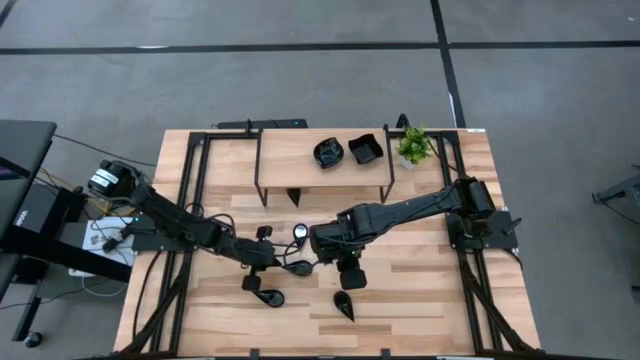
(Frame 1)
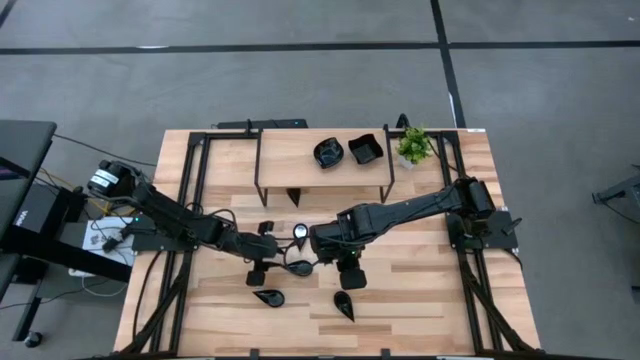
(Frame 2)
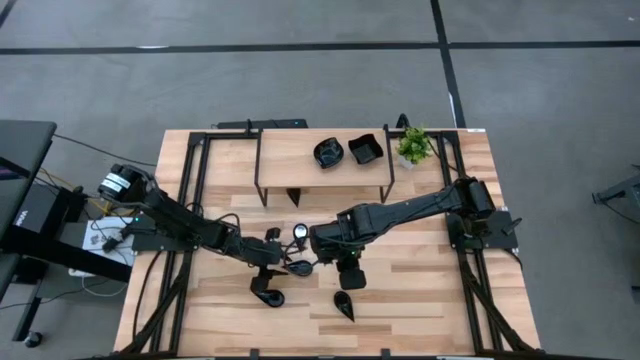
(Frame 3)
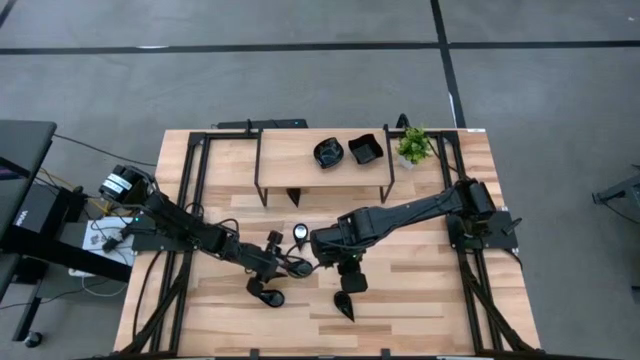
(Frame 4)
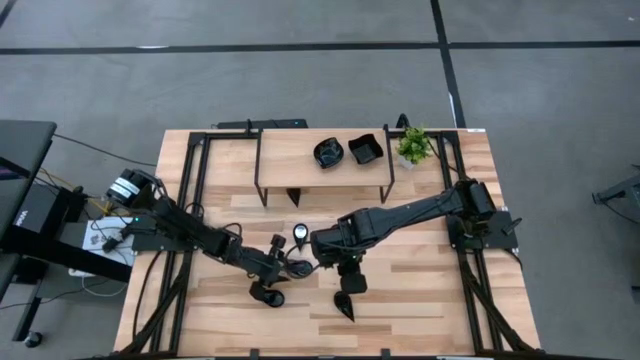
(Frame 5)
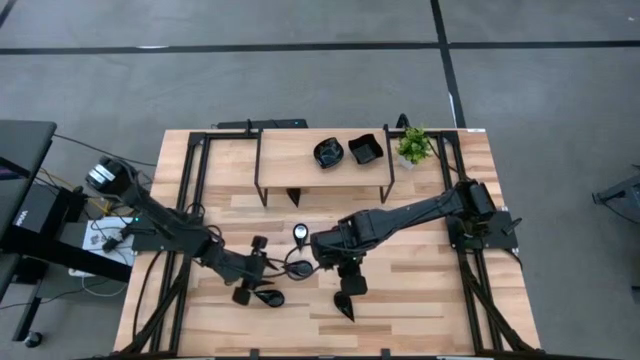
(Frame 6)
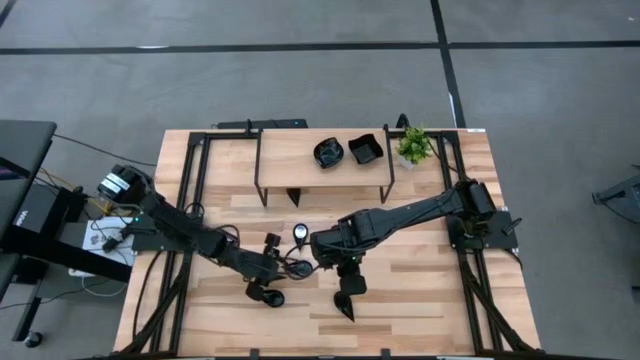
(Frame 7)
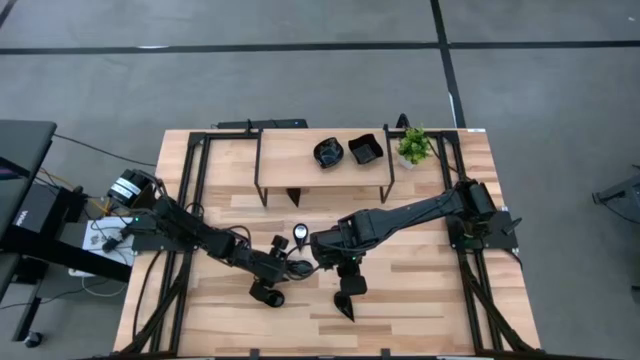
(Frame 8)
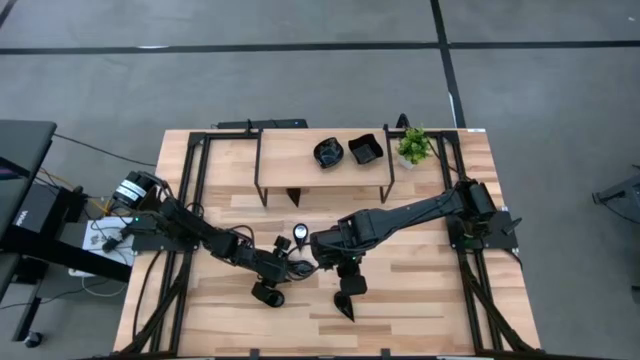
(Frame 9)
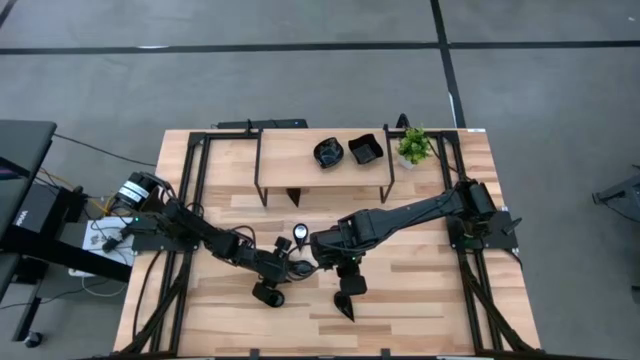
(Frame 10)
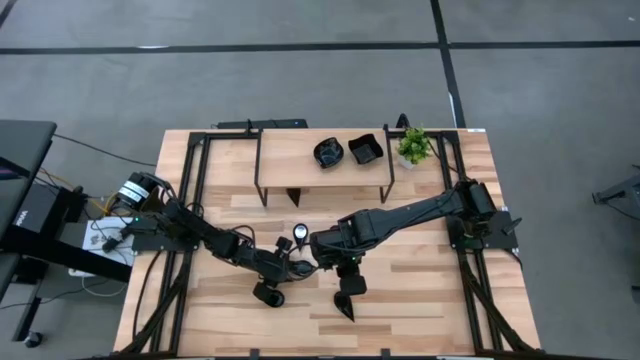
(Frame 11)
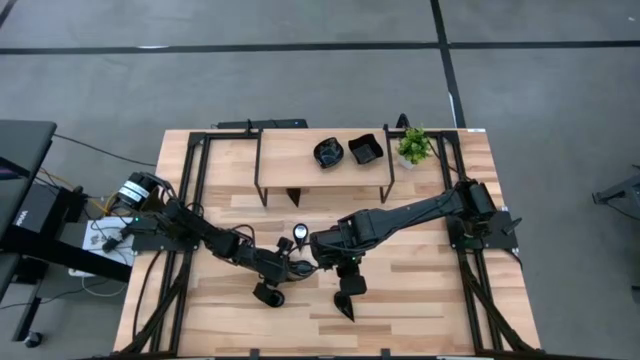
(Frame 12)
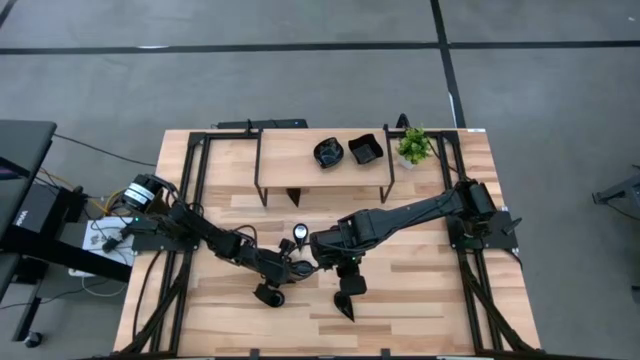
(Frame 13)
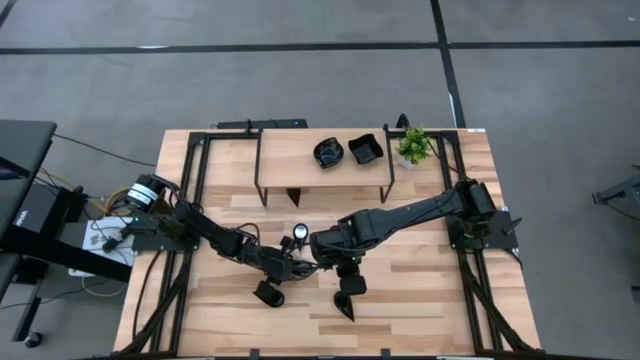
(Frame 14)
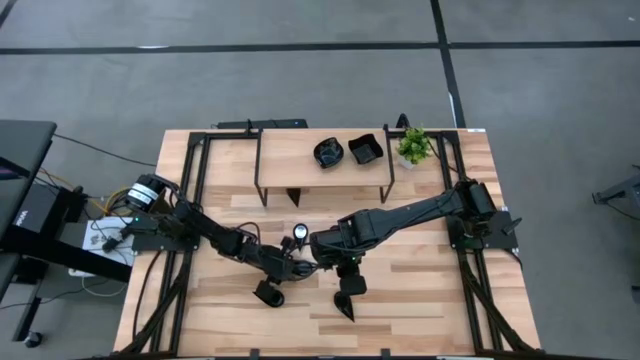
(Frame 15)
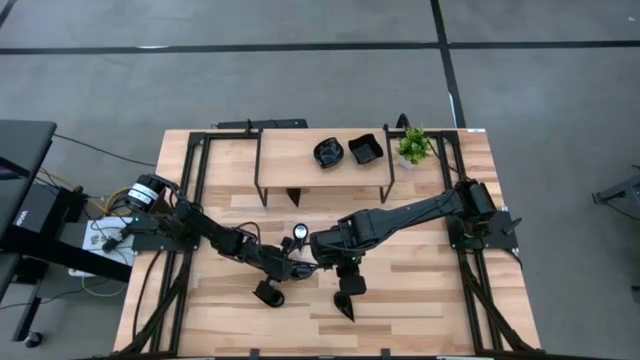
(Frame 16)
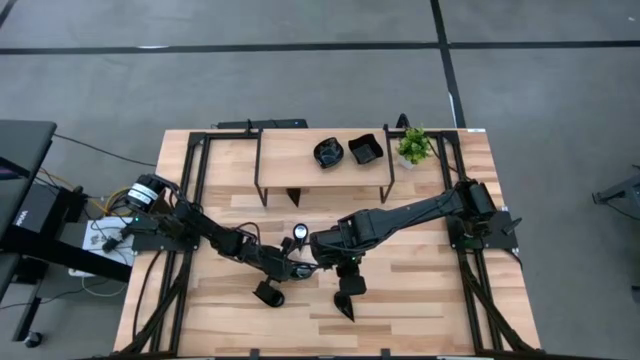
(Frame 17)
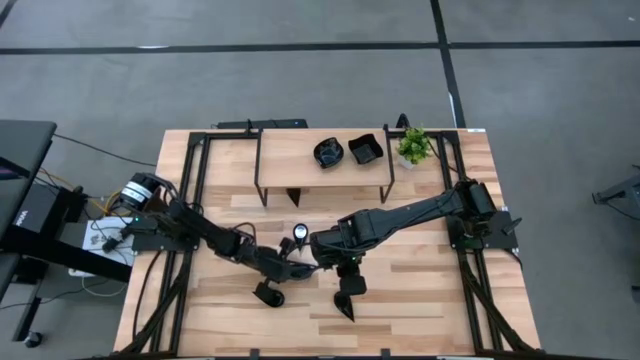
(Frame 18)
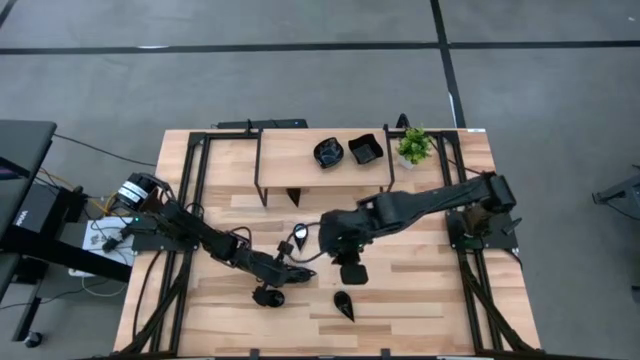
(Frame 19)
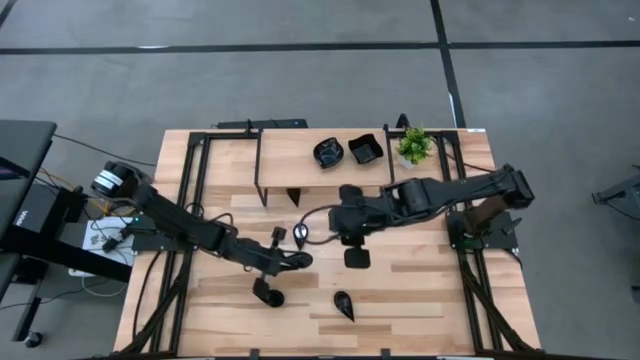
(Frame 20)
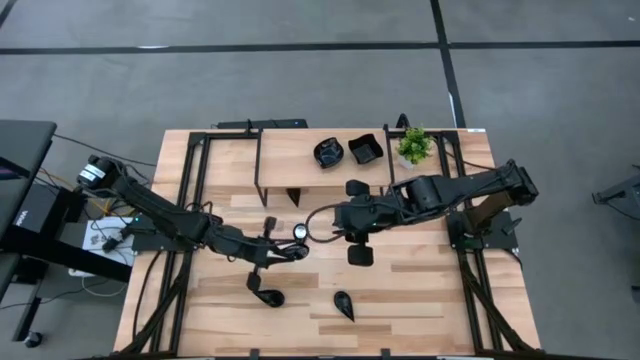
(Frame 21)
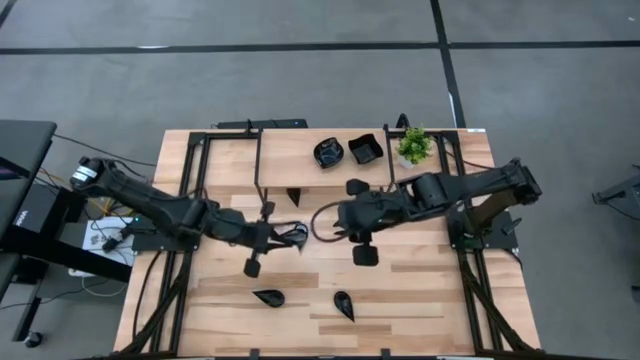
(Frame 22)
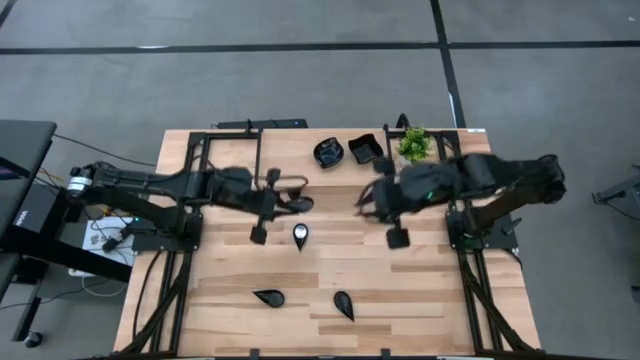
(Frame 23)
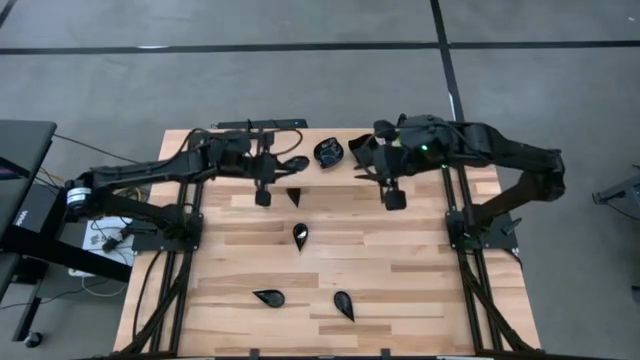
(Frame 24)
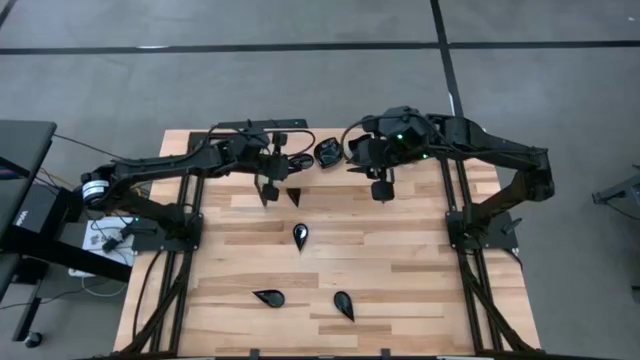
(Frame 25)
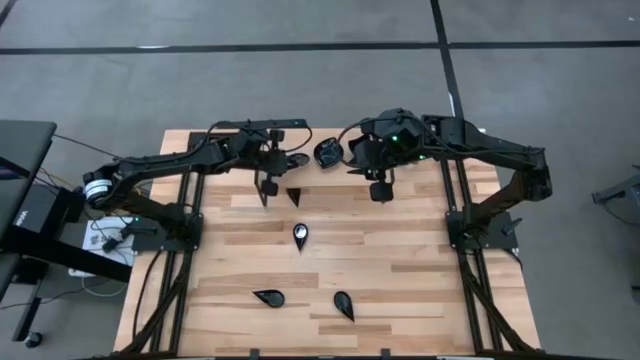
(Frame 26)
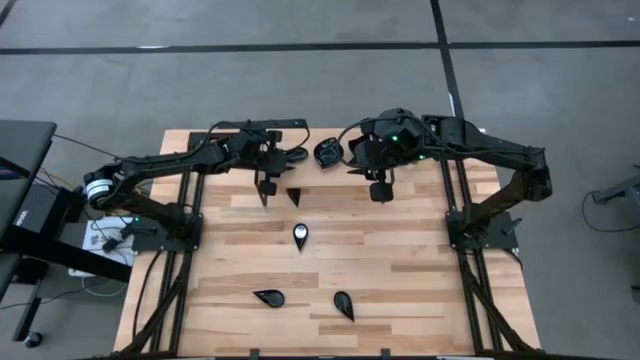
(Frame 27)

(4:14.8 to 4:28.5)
Task: Pick & Place Mini shaped plates
Put the black drop shaped plate on the shelf

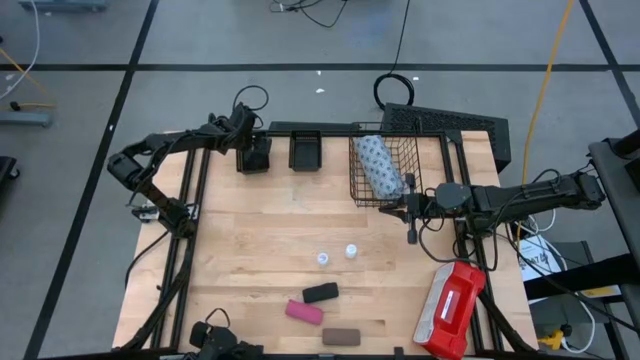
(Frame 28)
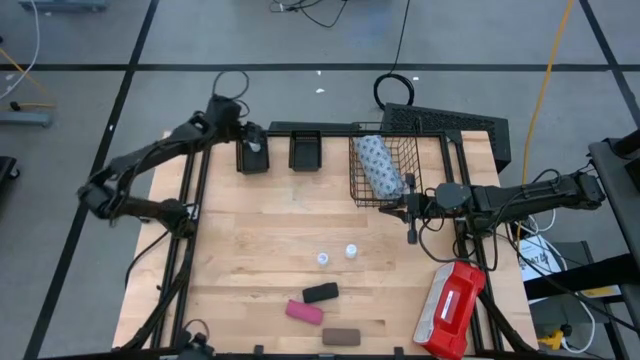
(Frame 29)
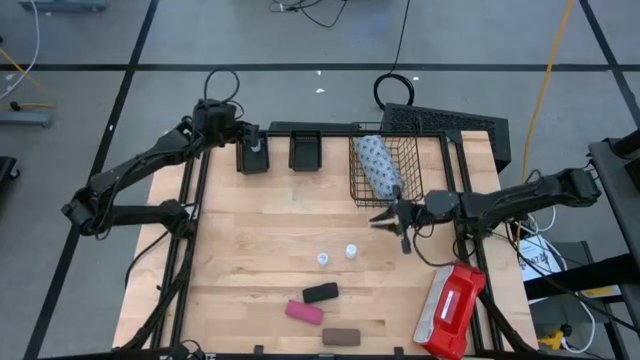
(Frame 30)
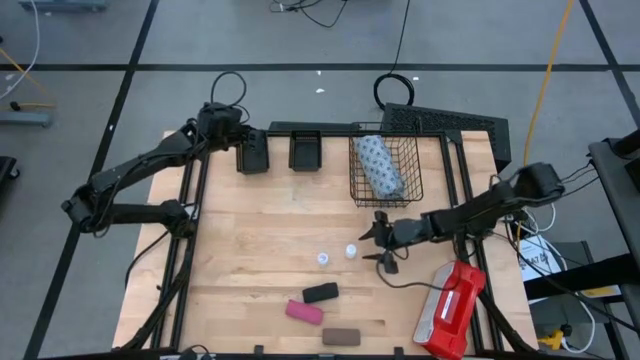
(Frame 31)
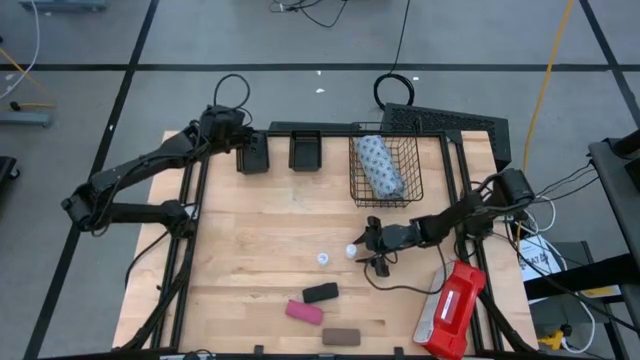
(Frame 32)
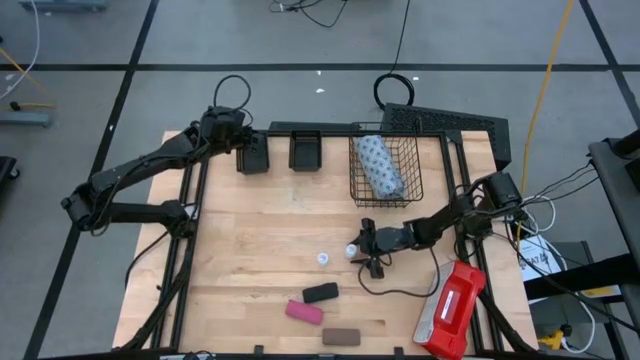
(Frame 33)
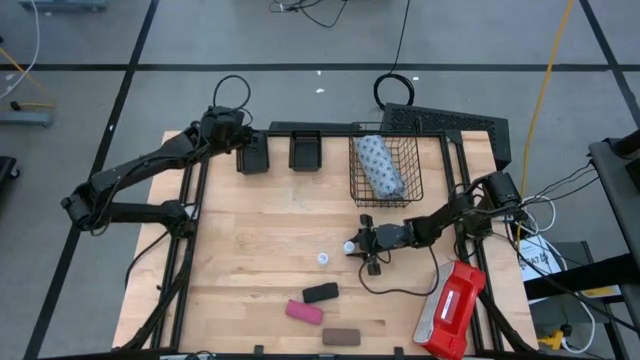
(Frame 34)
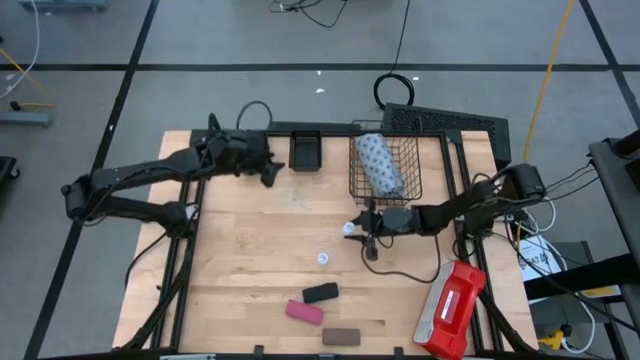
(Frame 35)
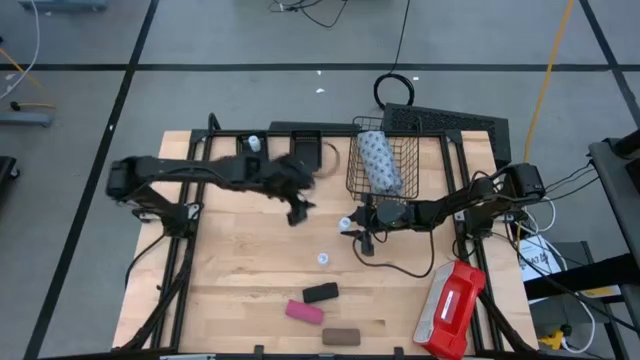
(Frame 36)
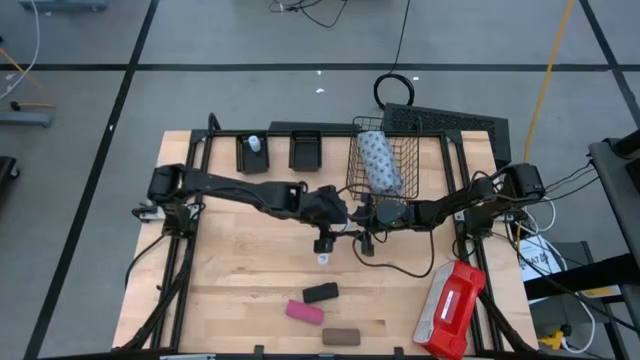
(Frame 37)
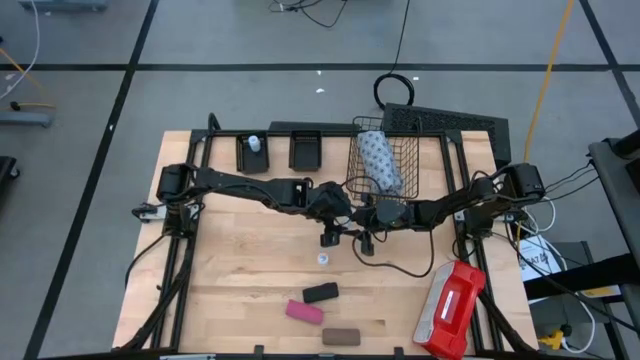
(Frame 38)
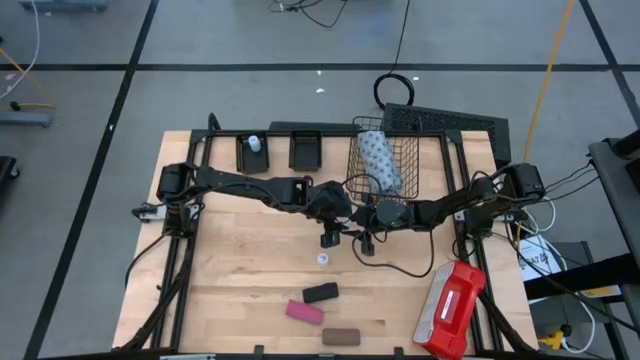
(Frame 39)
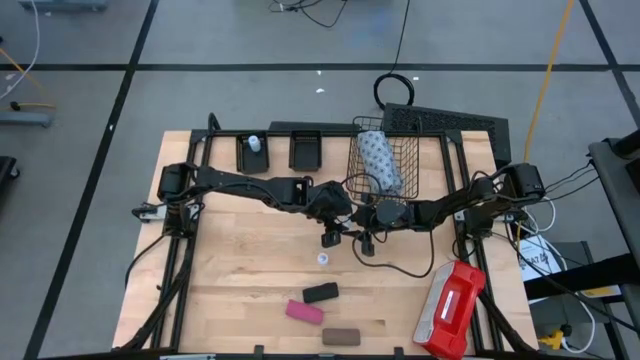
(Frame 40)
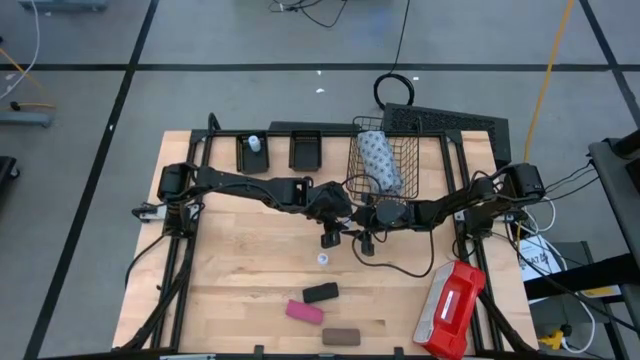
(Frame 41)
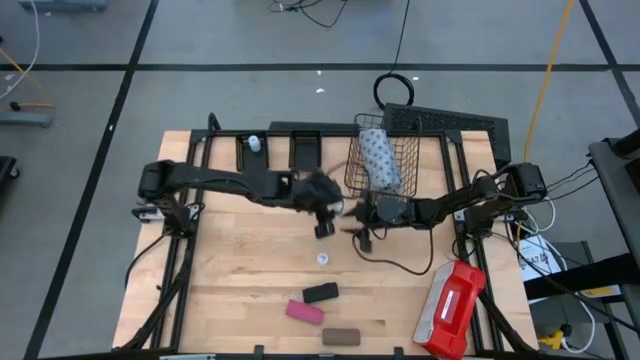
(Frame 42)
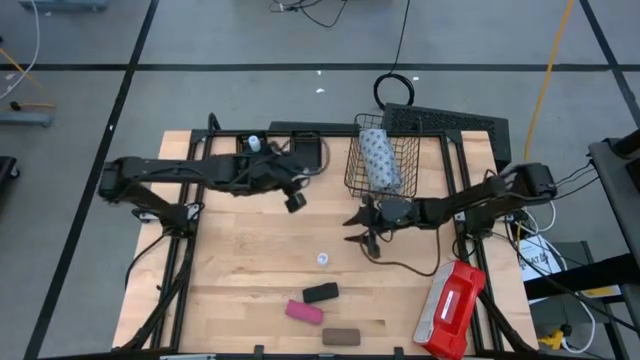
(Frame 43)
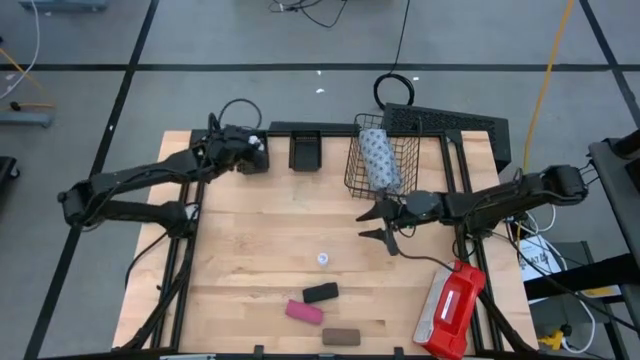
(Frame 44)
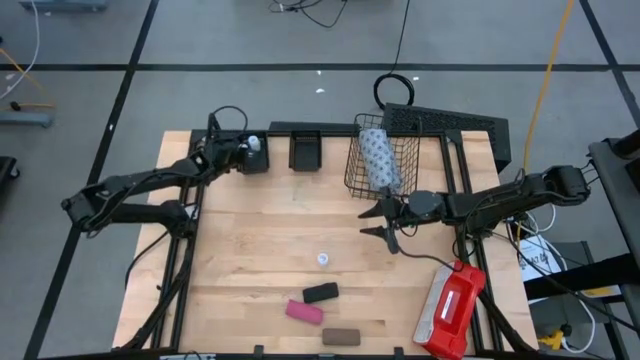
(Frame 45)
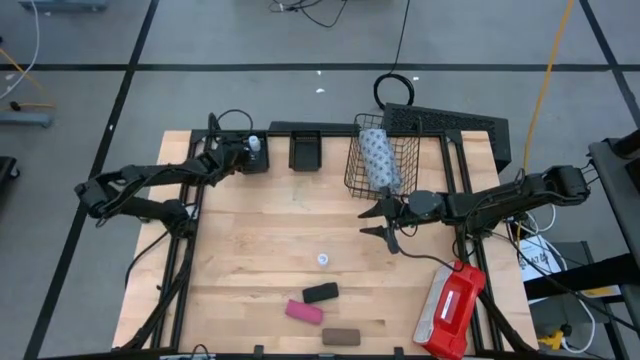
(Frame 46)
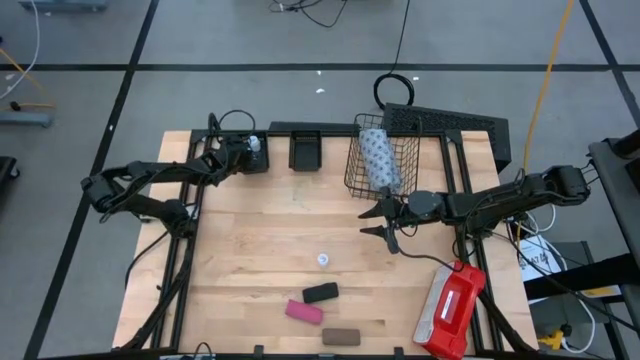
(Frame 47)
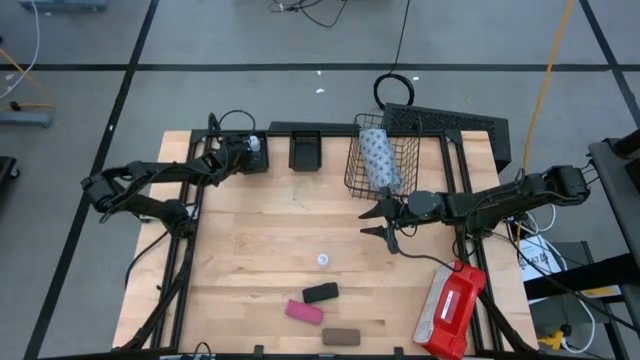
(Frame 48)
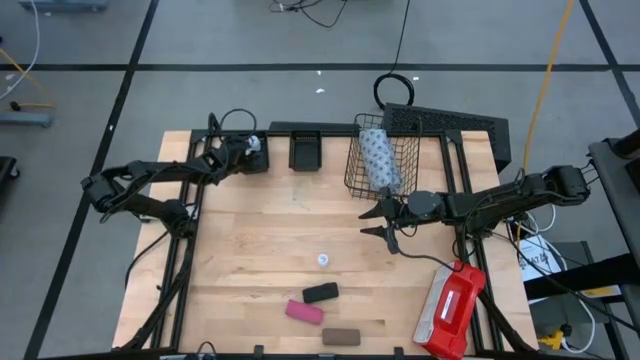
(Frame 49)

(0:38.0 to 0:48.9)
Task: Pick & place medical supplies in basket/bin
Put the right white pill bottle into the left black basket
